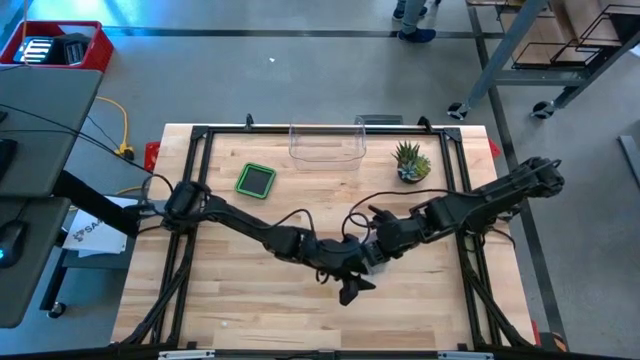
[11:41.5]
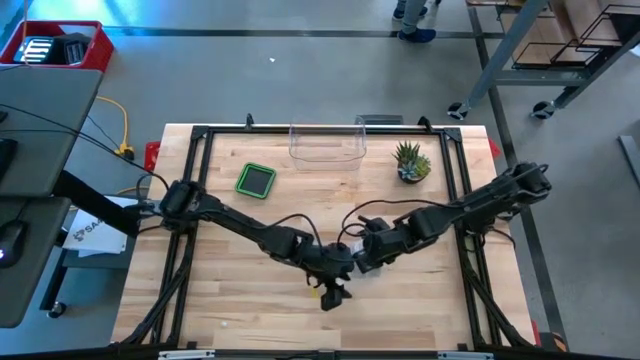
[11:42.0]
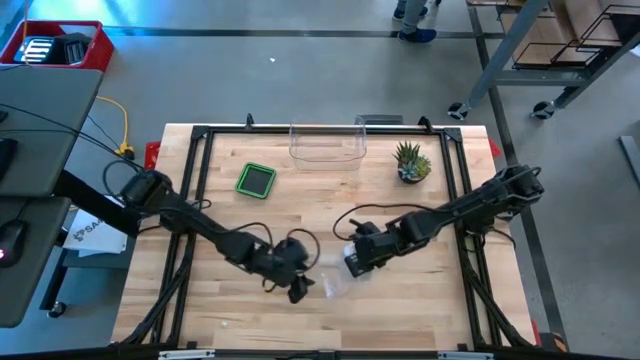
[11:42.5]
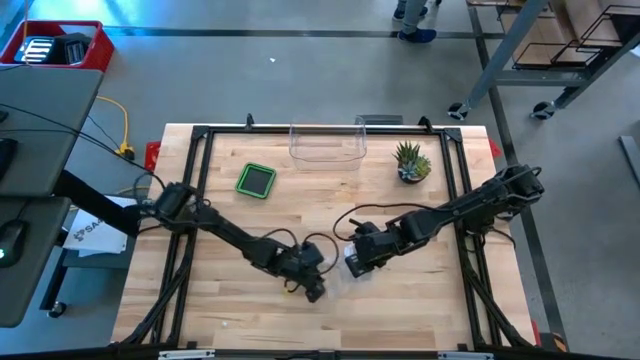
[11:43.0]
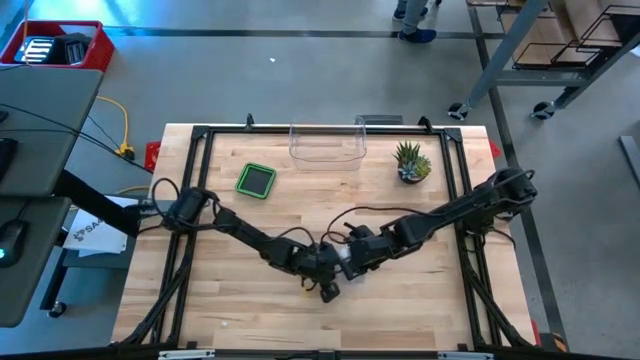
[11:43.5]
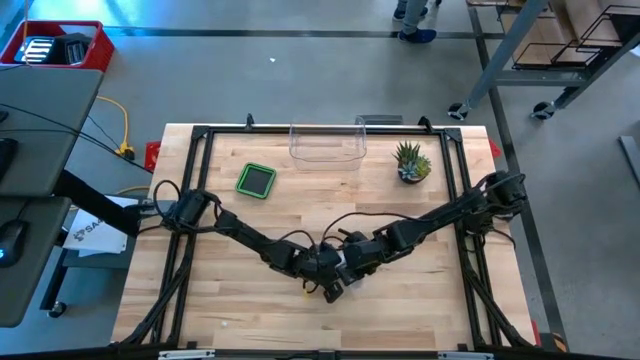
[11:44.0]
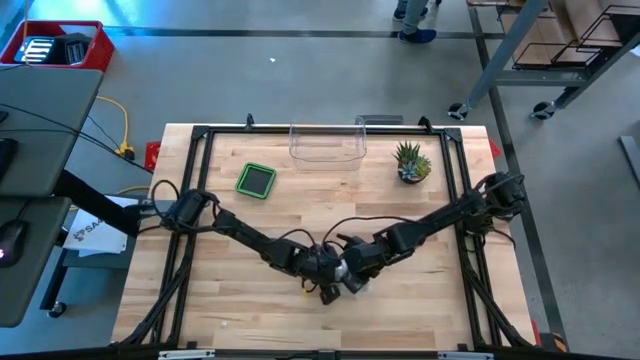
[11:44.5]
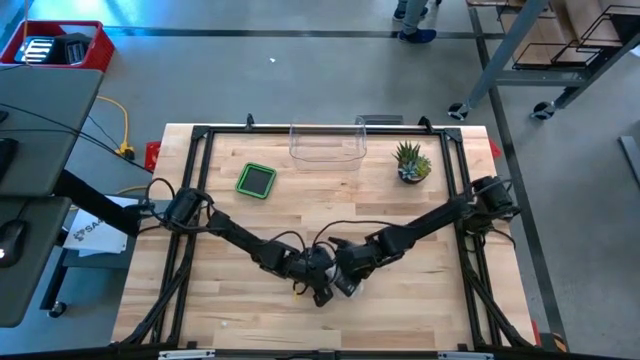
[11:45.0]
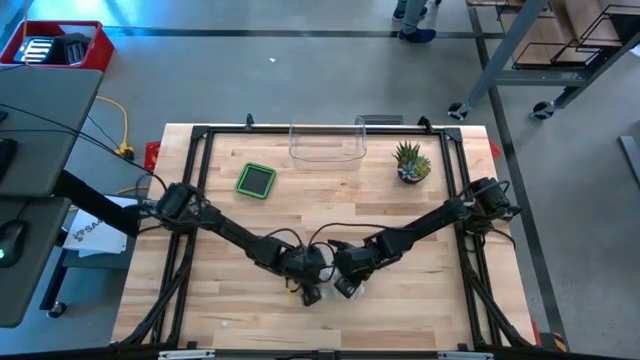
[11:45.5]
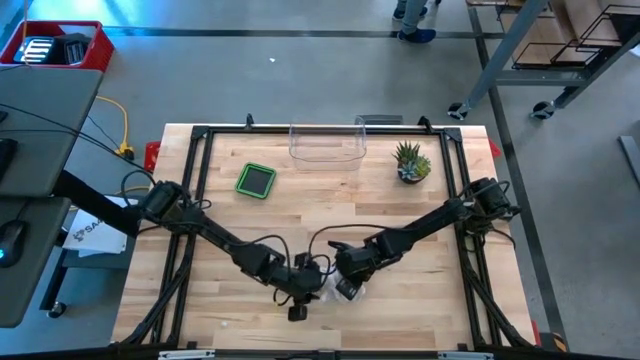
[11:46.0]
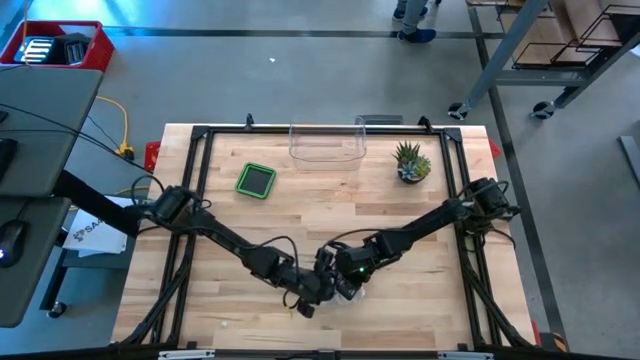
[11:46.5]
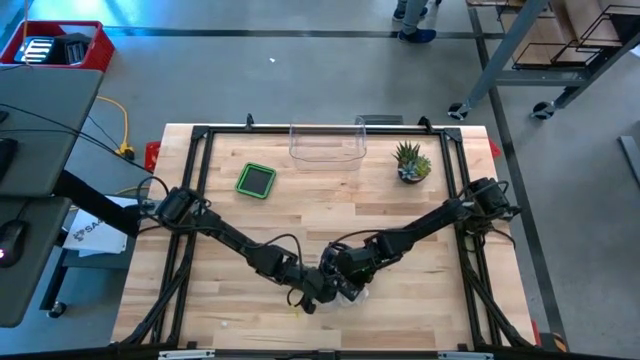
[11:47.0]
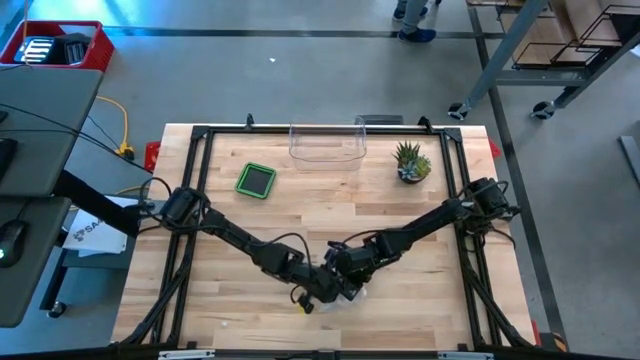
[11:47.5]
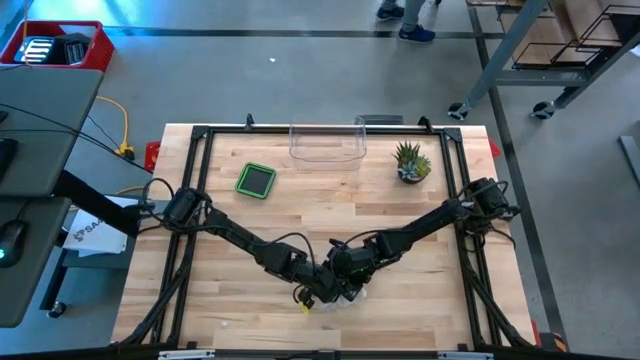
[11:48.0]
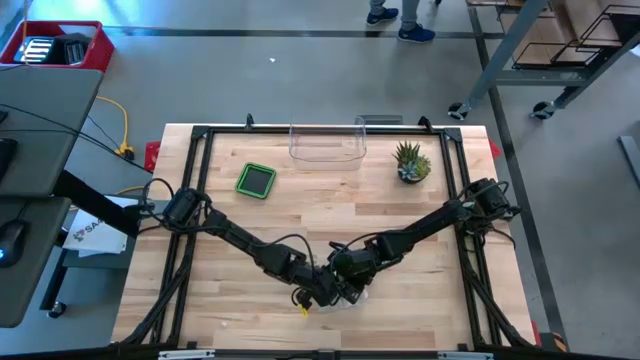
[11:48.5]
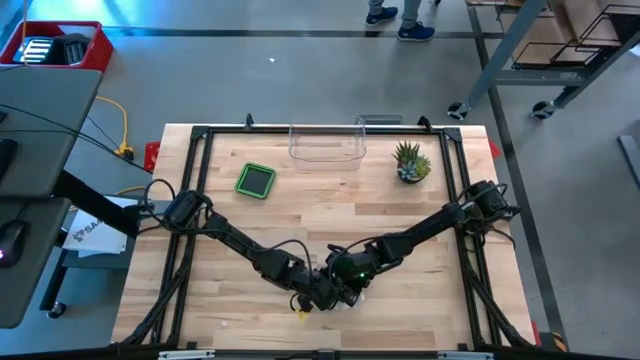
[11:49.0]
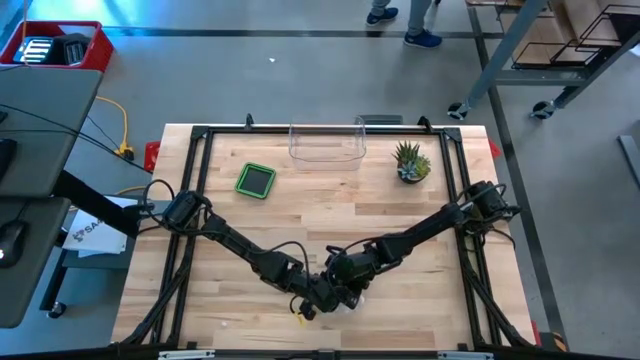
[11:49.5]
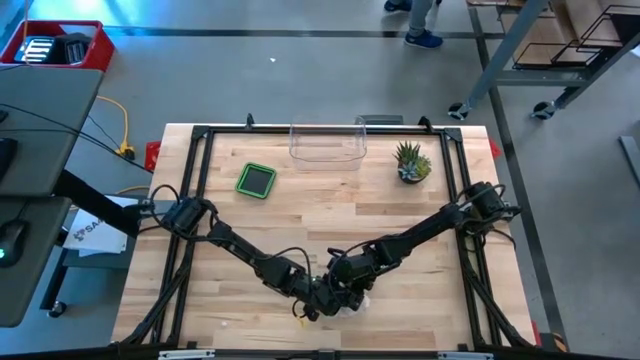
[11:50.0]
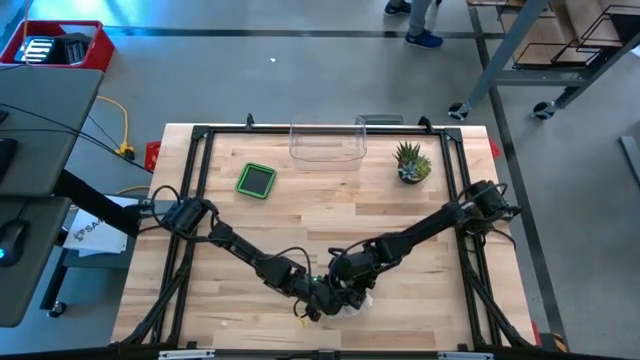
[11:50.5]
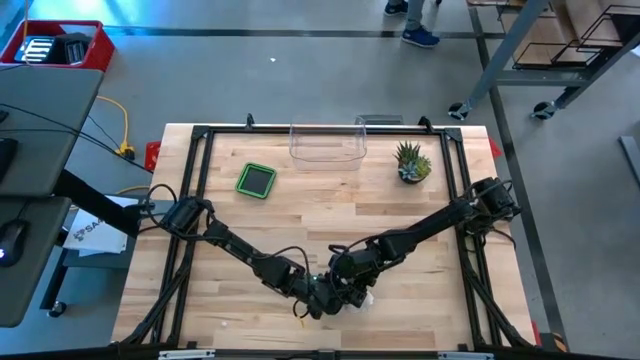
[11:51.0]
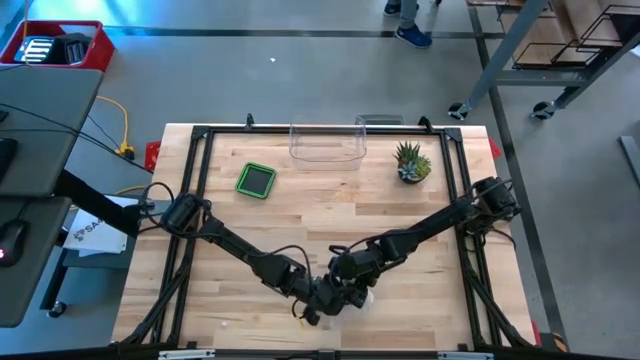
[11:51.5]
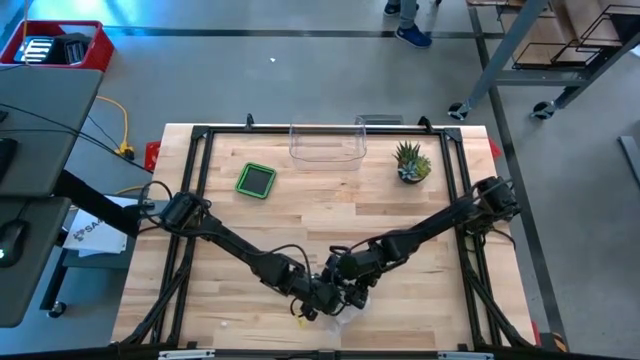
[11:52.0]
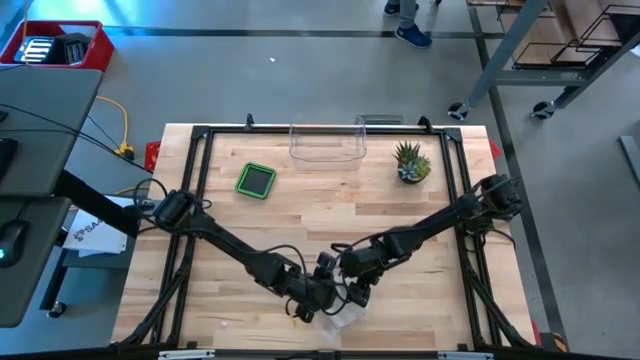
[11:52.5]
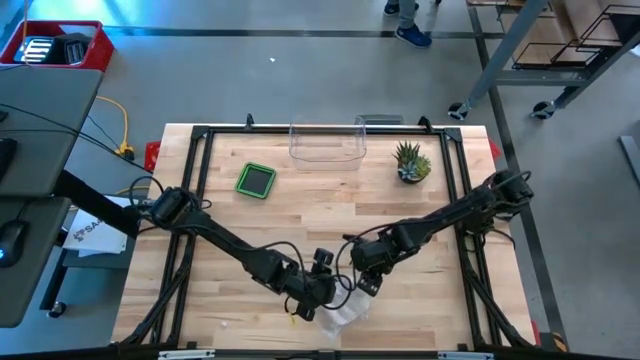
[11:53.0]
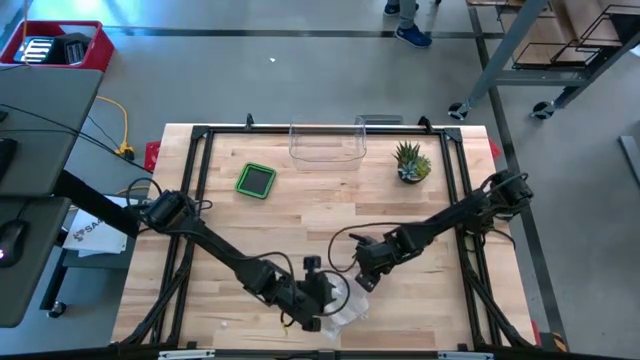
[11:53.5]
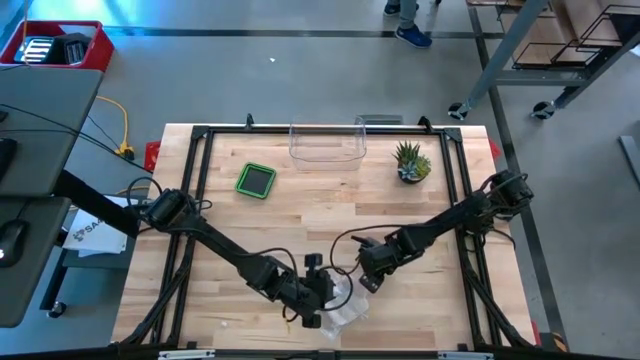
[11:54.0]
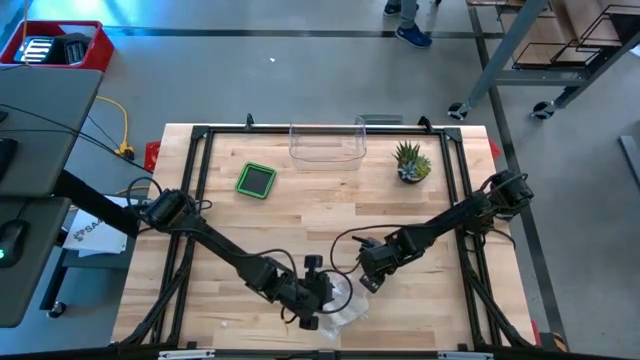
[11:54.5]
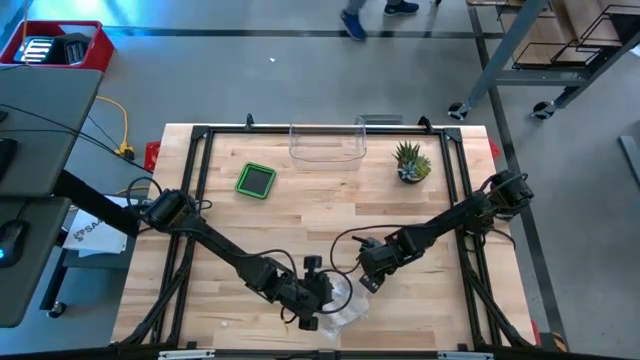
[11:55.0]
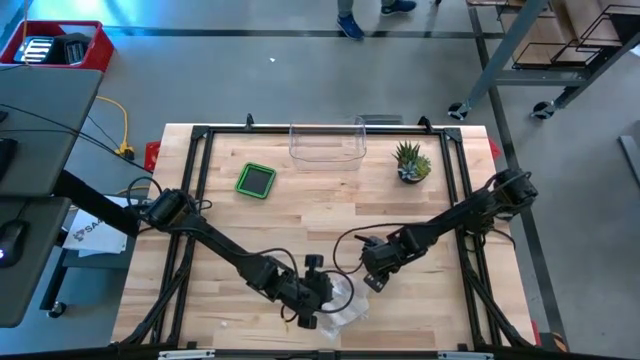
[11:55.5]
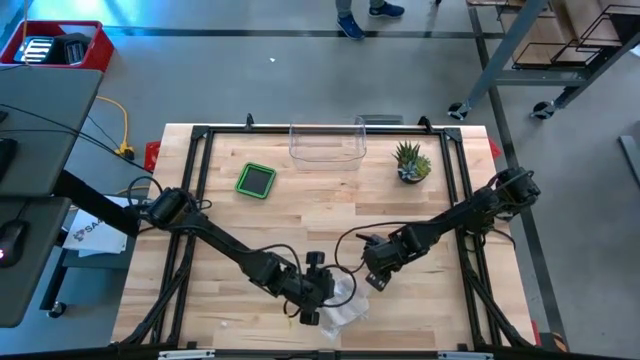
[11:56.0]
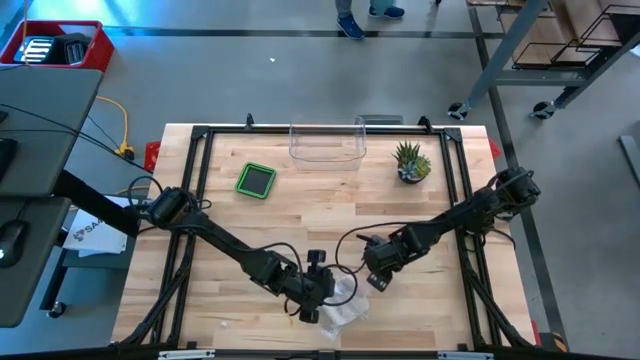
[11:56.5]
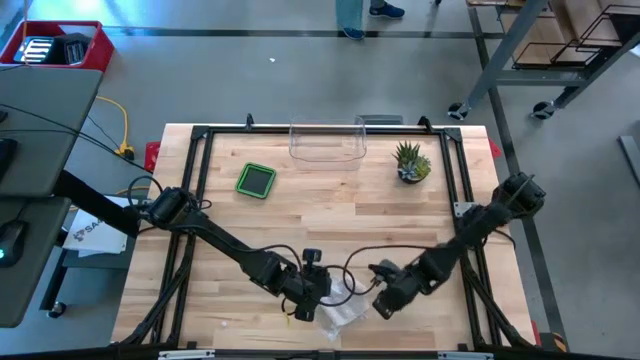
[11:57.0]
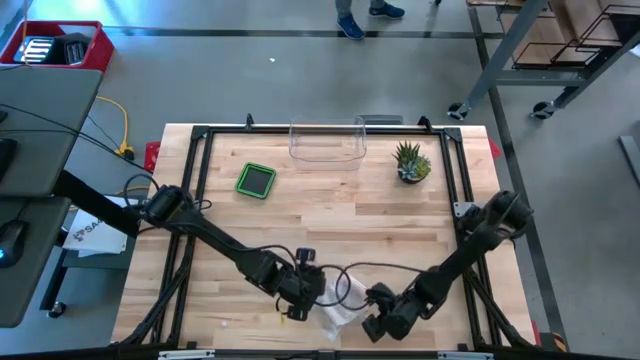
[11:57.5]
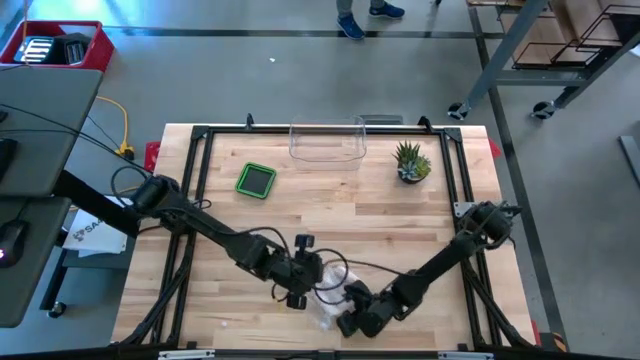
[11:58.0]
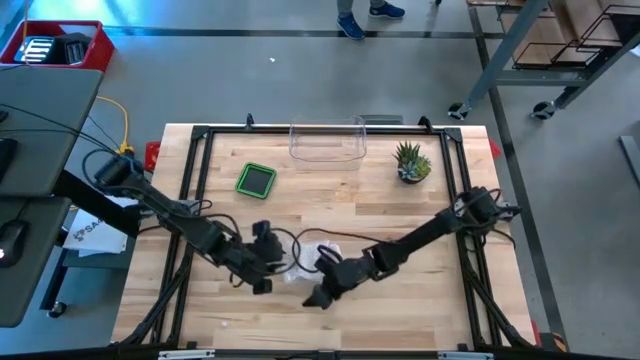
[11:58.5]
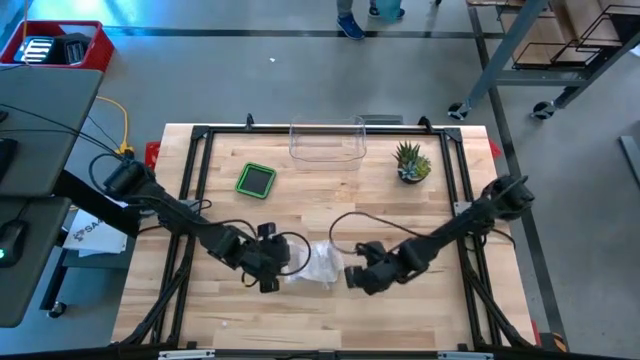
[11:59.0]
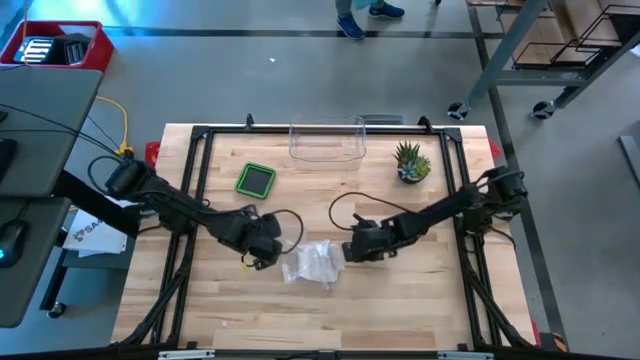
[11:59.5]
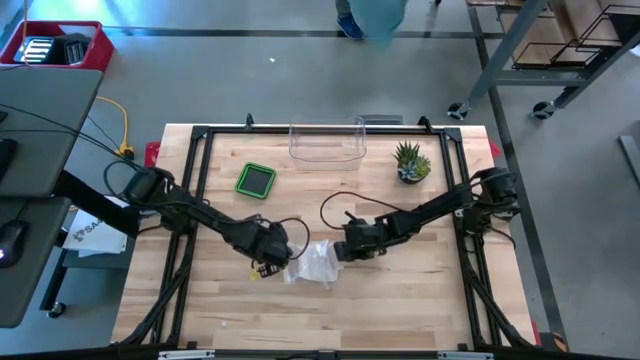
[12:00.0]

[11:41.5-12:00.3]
Task: Roll bandage
Put the rolled bandage into the transparent zip bag
